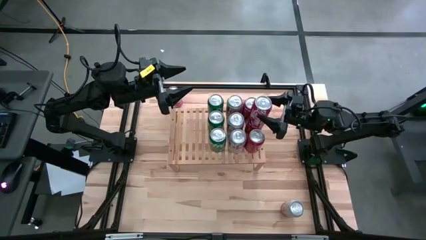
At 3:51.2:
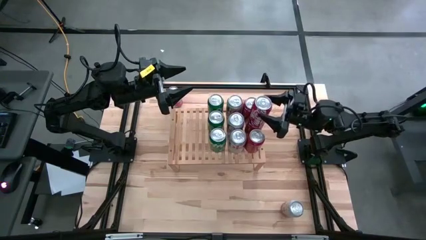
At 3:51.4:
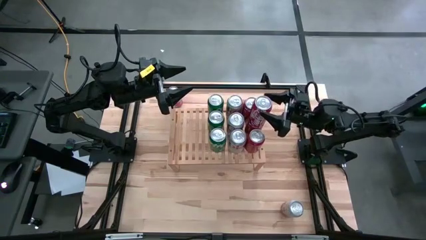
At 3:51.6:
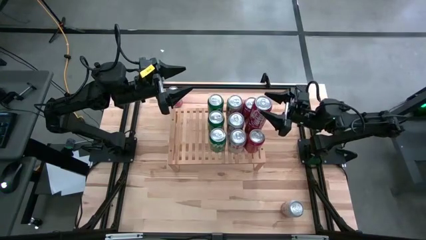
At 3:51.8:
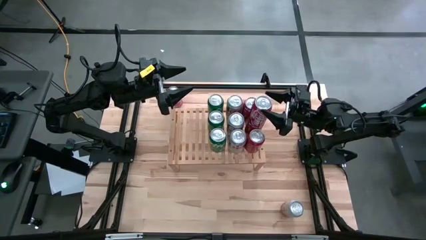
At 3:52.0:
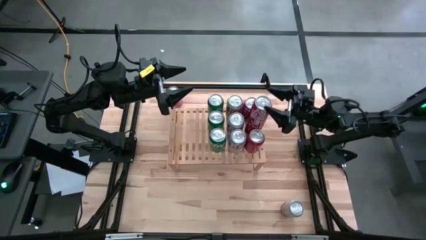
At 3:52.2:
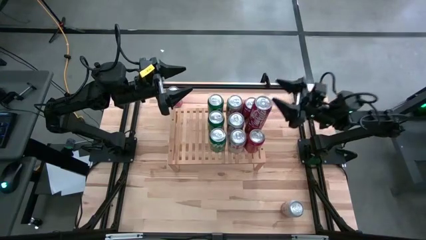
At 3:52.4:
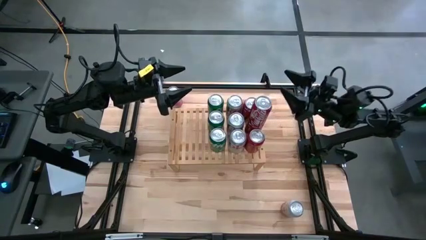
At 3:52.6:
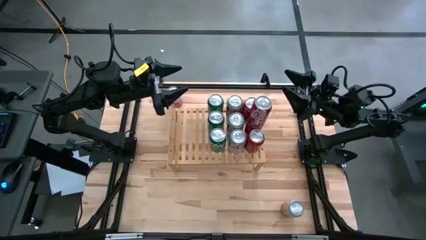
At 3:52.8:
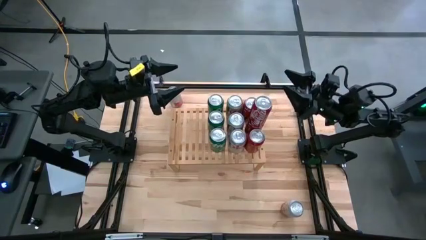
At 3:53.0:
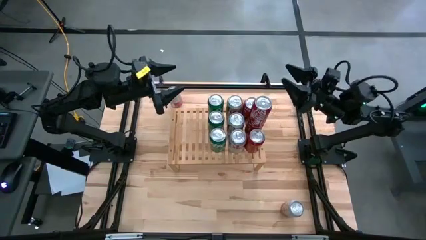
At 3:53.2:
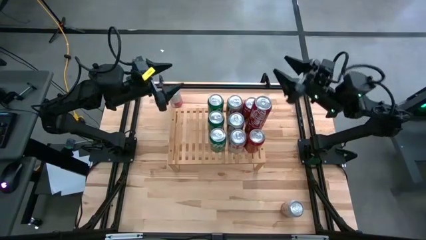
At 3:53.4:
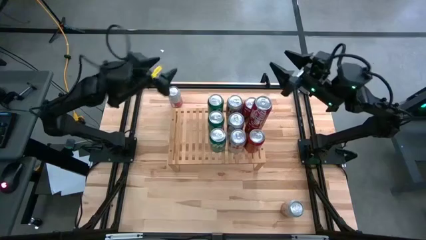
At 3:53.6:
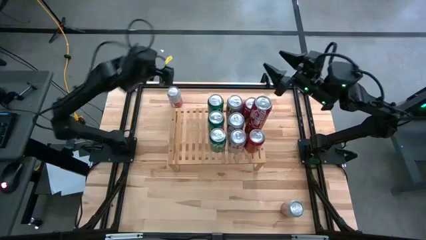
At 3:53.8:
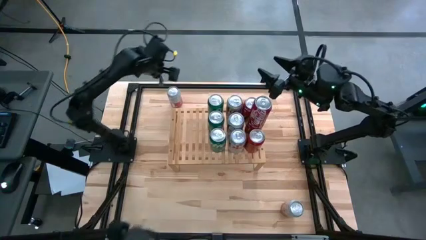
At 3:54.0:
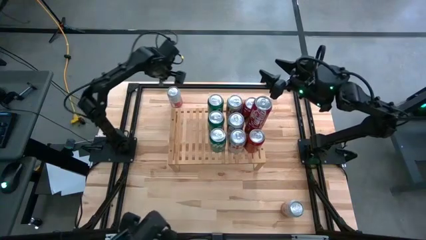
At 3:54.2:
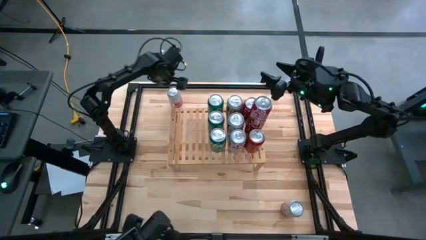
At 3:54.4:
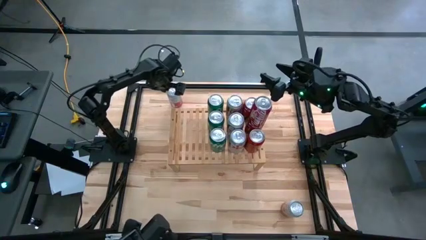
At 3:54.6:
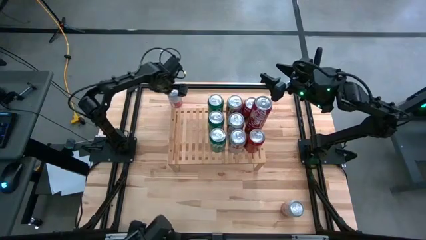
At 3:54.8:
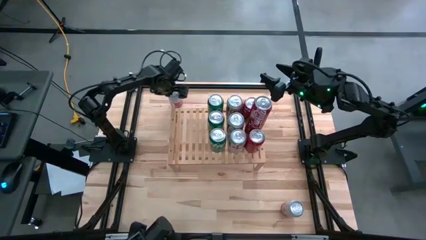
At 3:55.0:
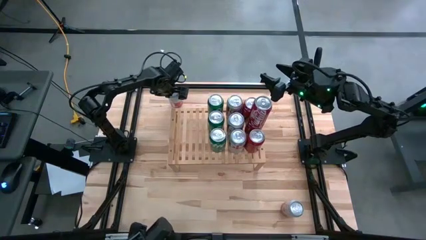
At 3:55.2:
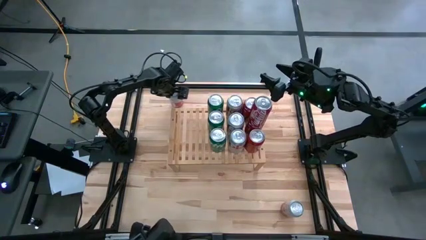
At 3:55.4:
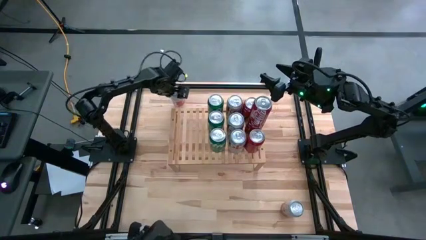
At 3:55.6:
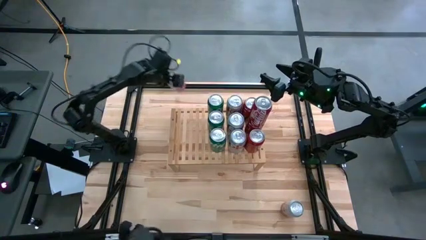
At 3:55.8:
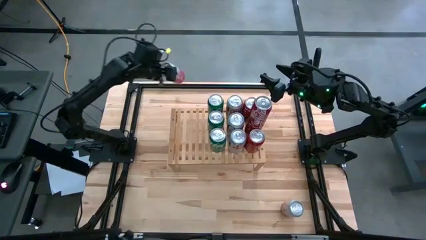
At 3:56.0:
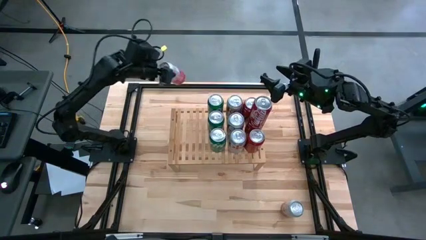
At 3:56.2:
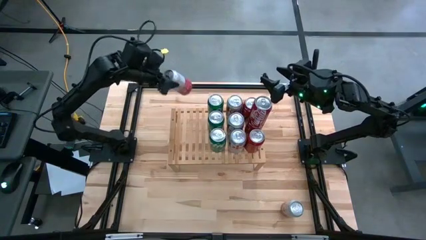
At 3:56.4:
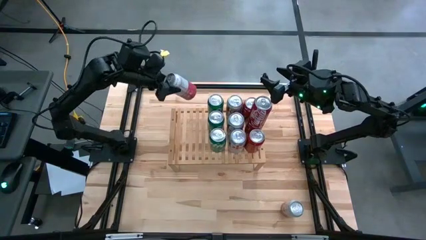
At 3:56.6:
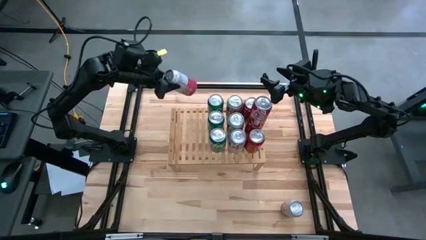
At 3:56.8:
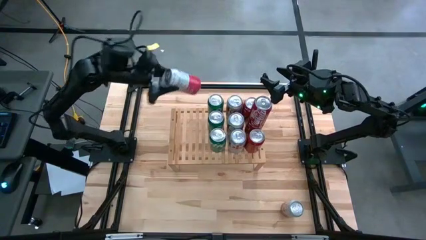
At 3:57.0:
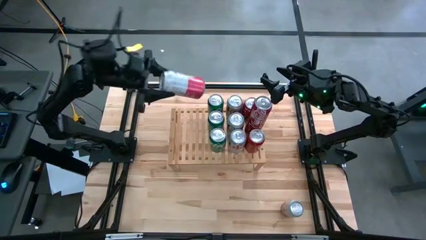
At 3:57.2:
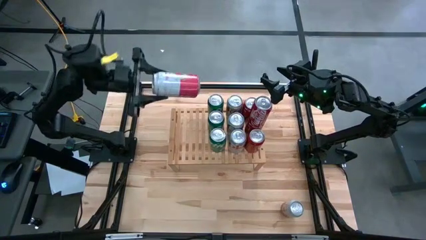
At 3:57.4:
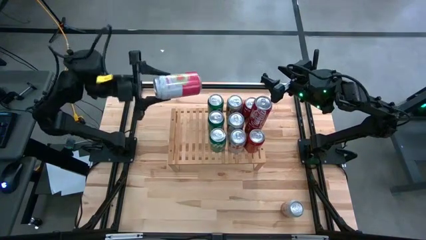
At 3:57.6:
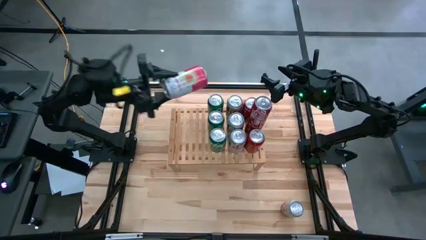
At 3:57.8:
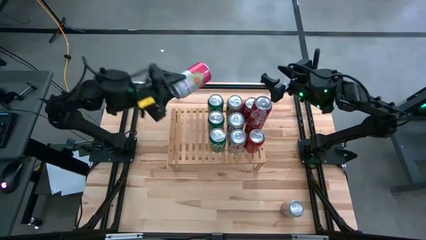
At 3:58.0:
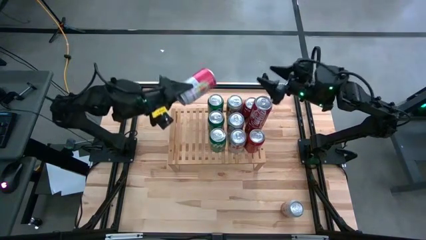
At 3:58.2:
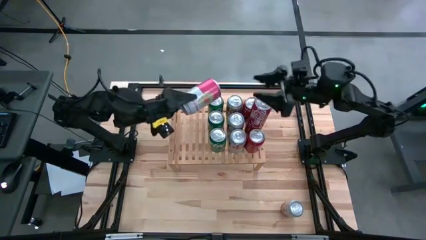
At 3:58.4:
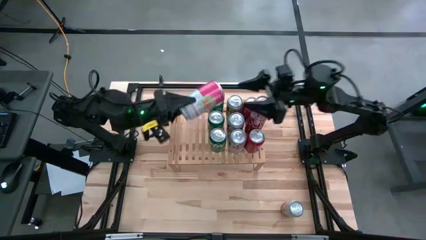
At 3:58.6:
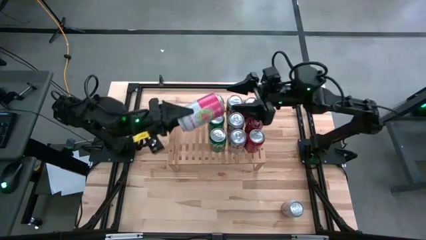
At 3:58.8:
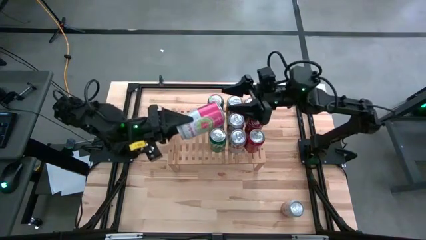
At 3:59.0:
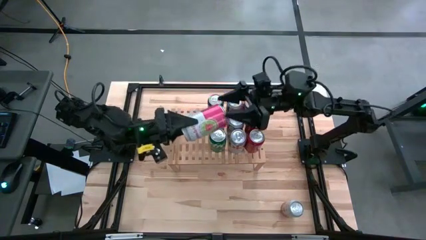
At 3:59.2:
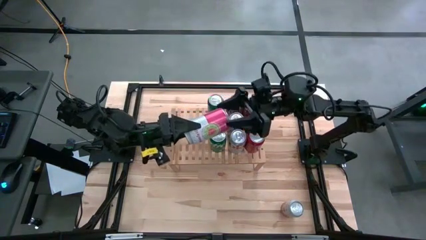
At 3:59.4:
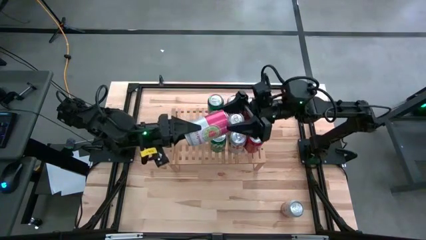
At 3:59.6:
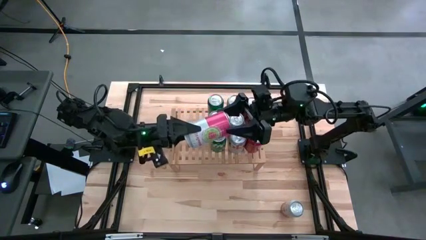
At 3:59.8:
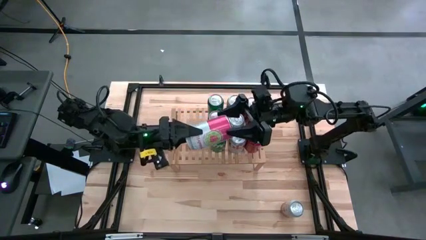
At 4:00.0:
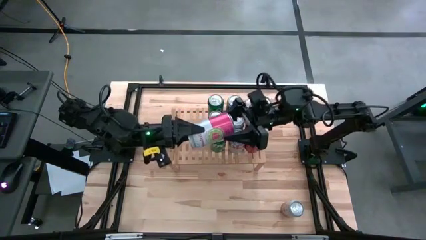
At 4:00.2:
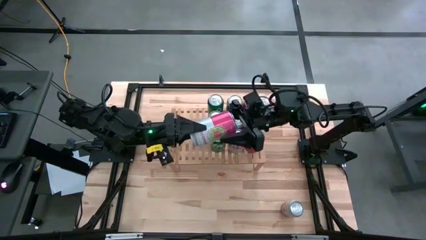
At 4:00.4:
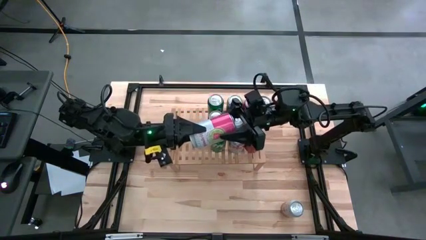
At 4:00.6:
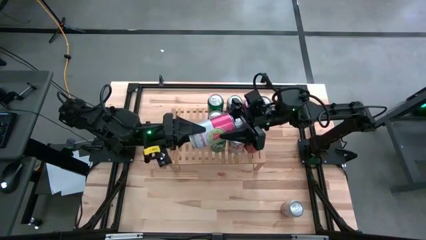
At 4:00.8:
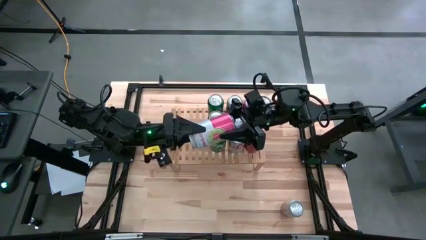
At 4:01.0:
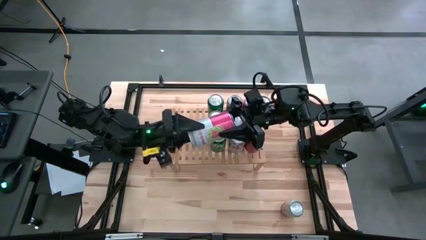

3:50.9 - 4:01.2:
Task: Place canned beverage on shelf
Put the top white pink soda can on the shelf

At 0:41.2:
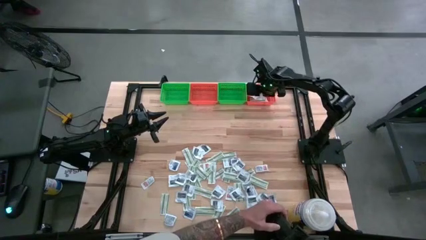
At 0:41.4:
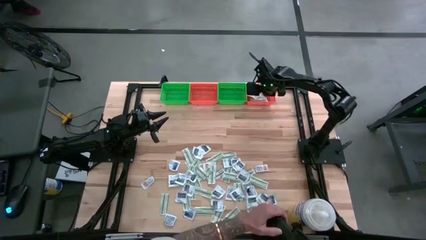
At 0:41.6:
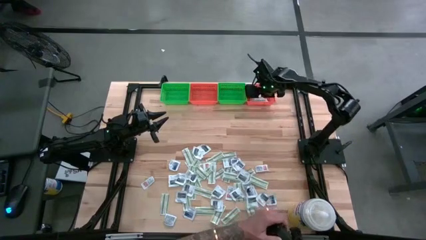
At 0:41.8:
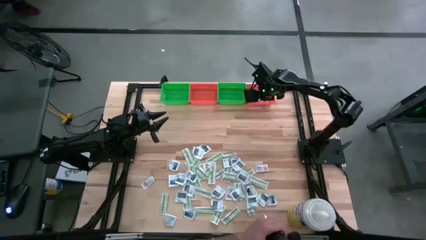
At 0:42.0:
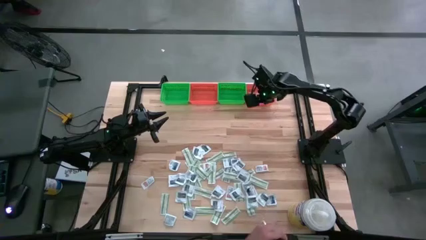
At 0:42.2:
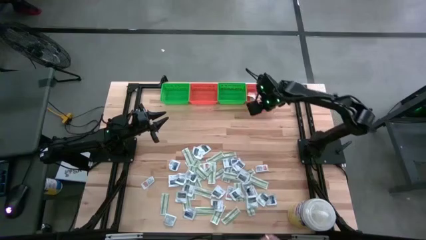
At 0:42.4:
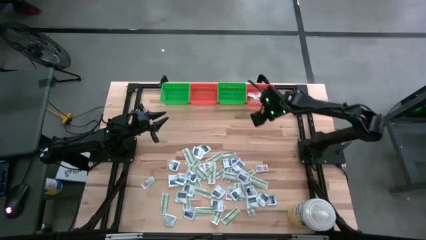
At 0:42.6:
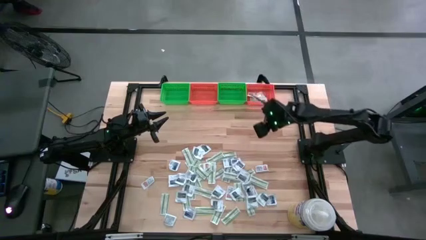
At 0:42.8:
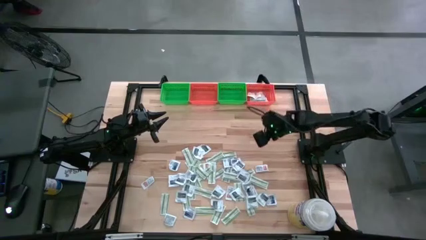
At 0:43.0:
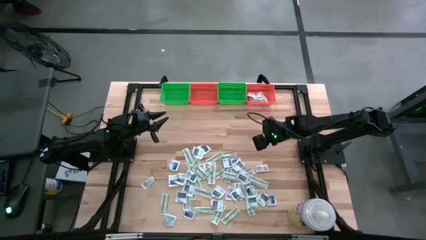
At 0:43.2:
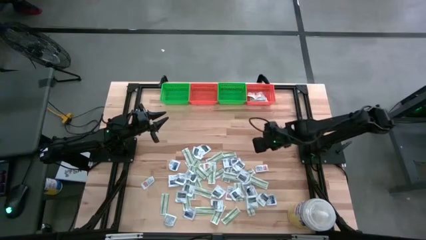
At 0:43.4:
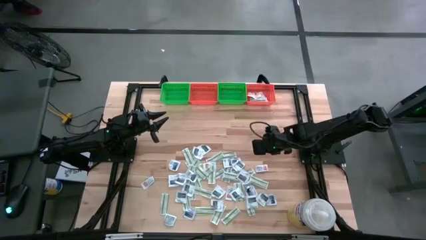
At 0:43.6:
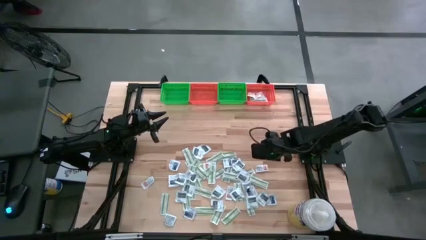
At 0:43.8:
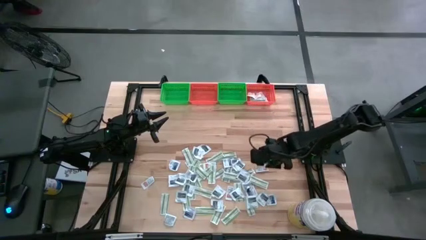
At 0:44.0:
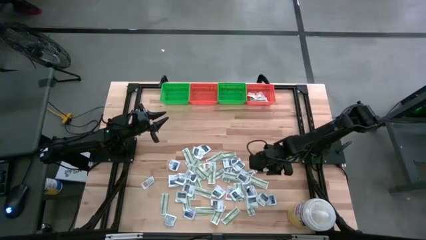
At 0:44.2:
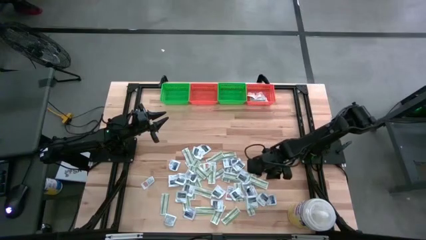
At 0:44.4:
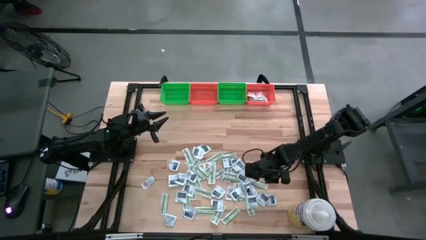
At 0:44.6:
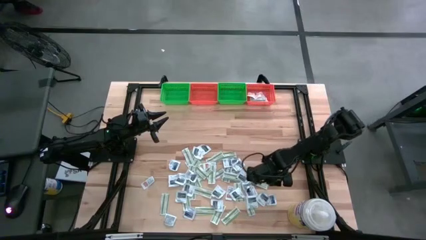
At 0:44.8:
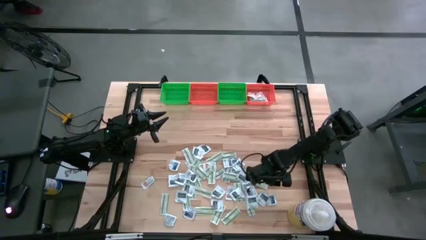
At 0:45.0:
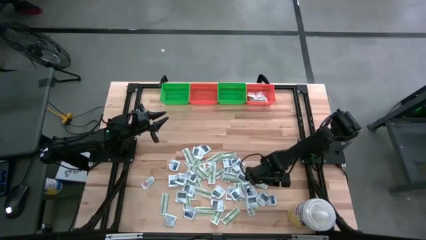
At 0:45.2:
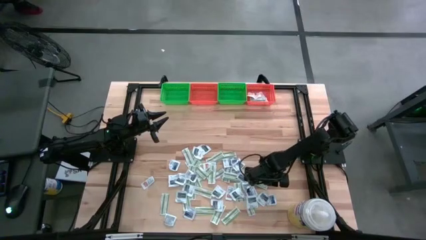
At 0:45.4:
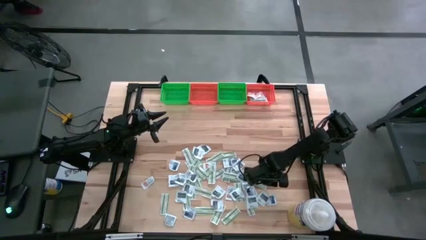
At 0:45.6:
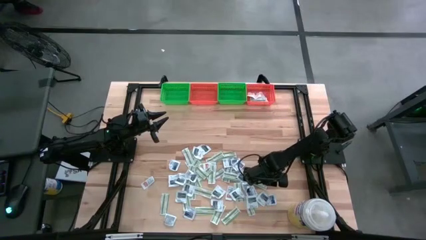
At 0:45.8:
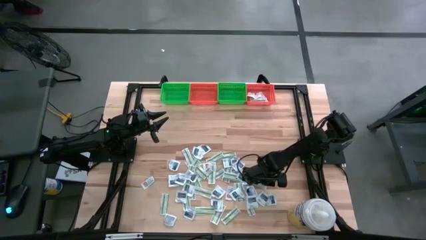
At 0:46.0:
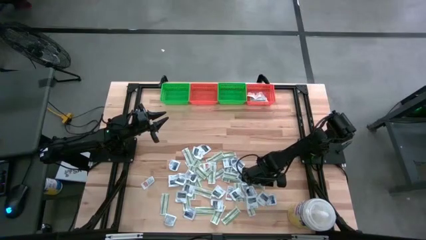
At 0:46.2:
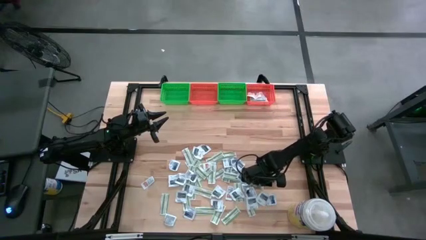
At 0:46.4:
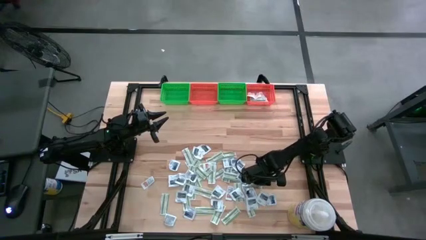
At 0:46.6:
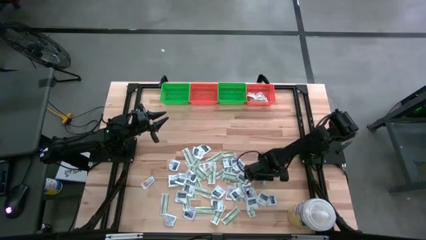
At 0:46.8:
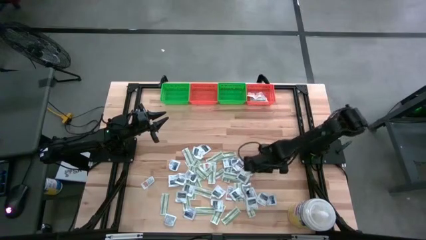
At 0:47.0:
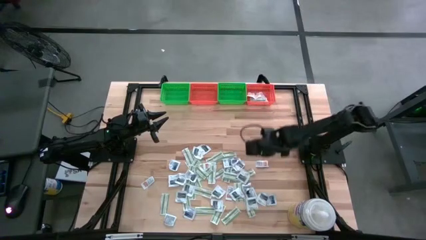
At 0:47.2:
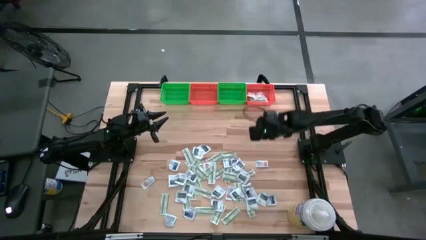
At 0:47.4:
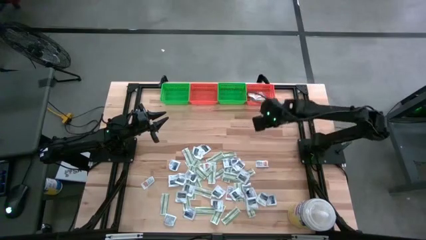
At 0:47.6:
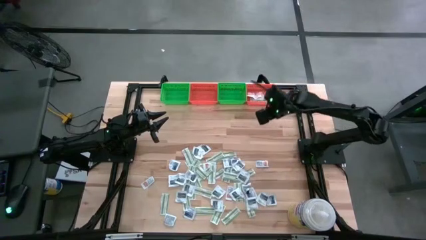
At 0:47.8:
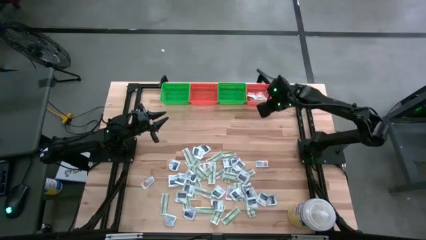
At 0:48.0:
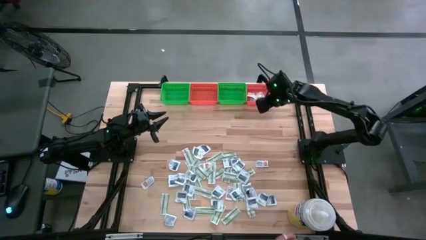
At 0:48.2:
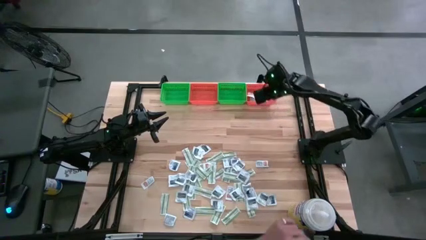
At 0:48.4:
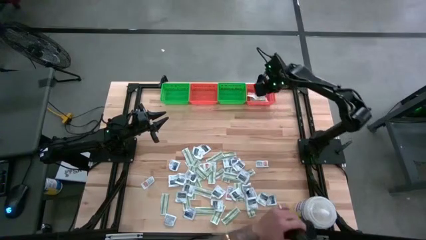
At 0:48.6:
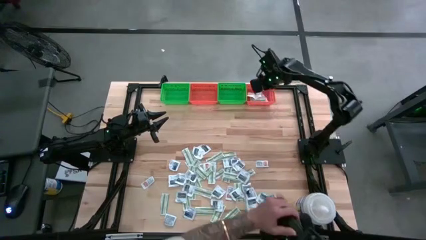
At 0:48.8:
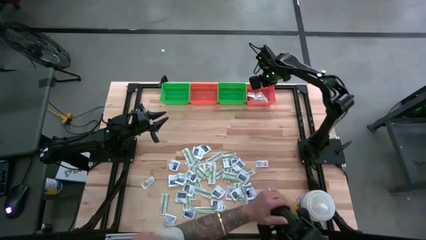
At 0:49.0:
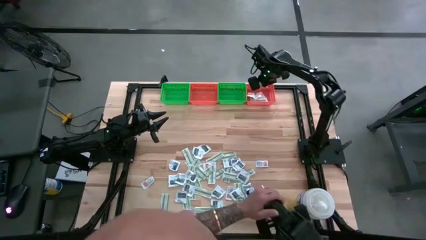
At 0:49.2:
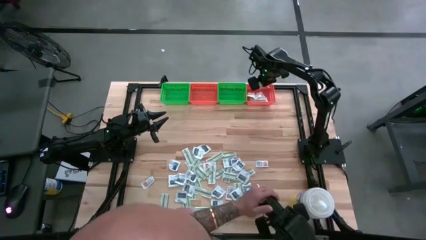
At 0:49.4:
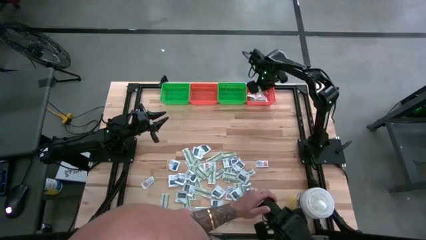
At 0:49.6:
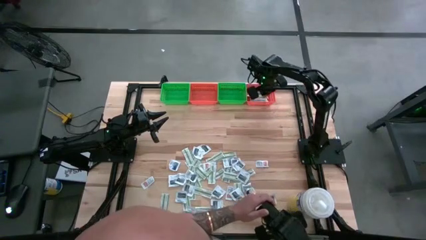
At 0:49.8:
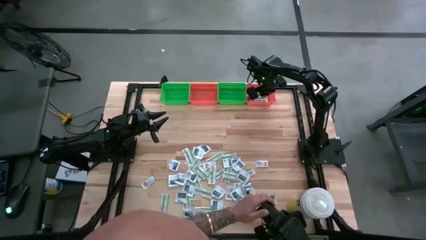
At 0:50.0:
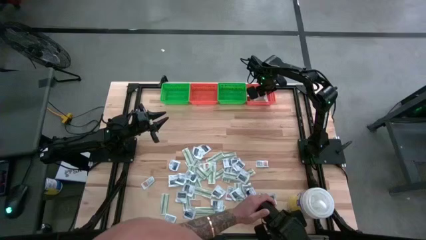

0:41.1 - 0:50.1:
Task: Pick & Place First Aid Supplies
Put the green bandage pack in the right orange bin
